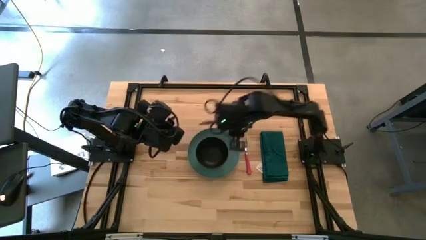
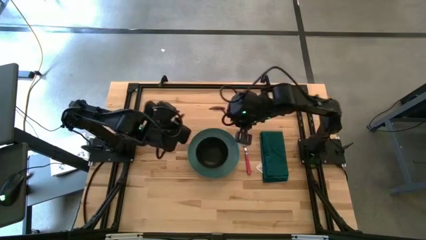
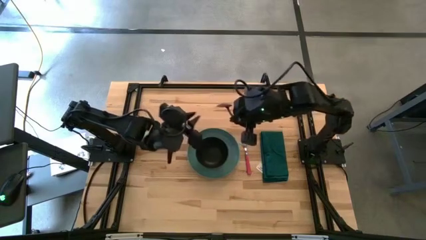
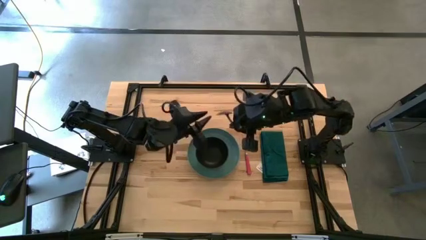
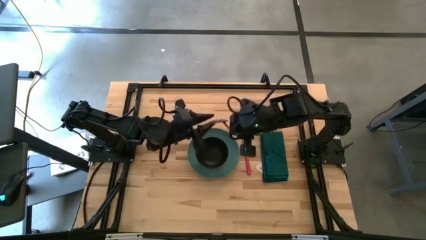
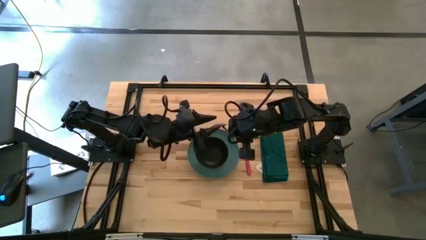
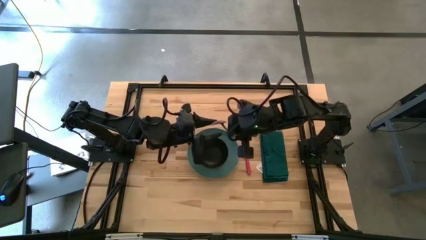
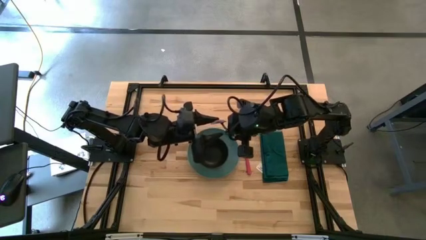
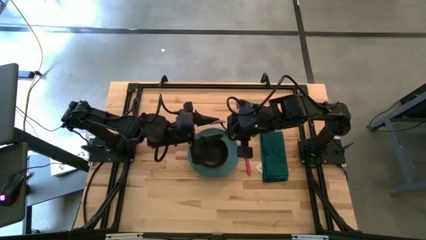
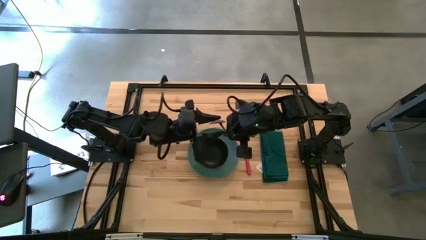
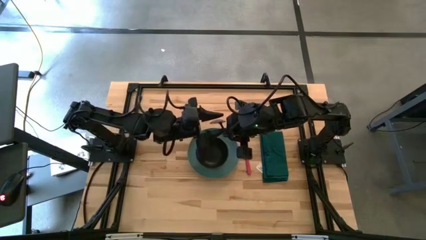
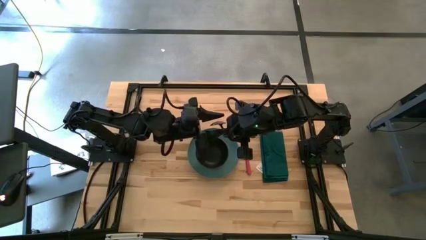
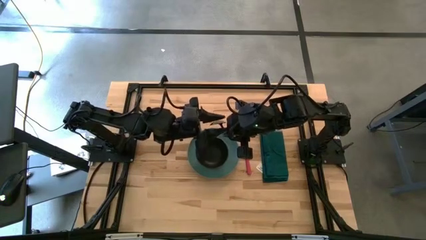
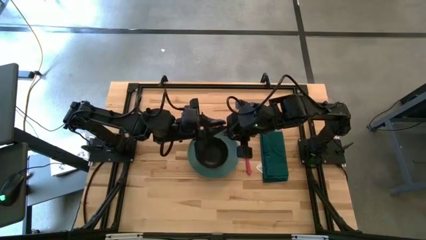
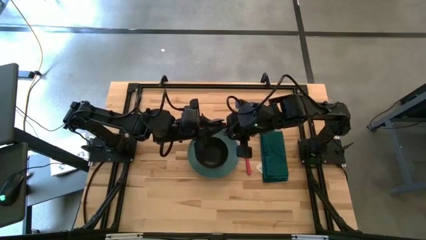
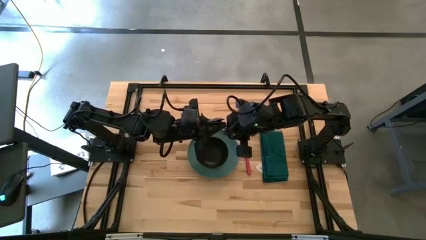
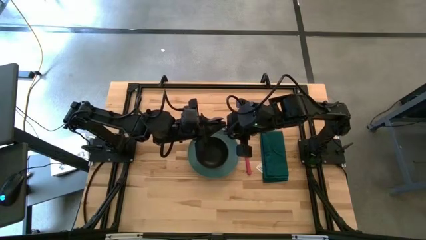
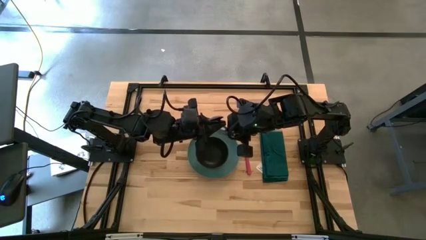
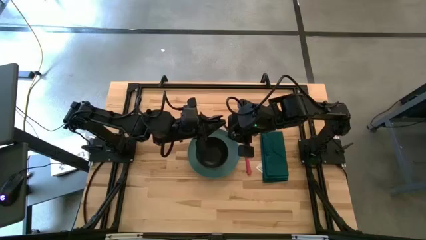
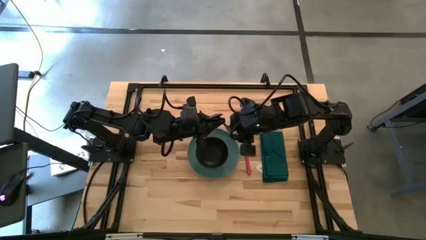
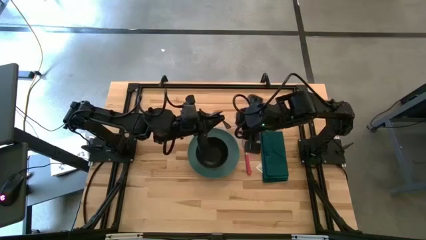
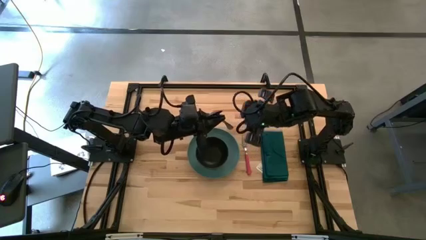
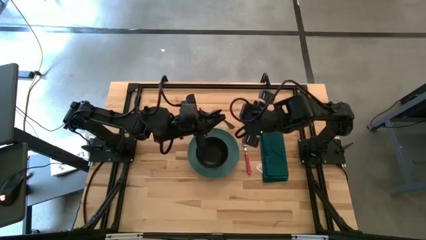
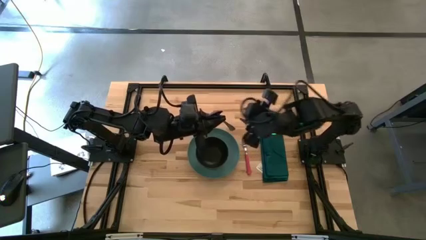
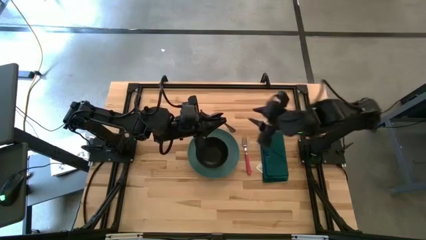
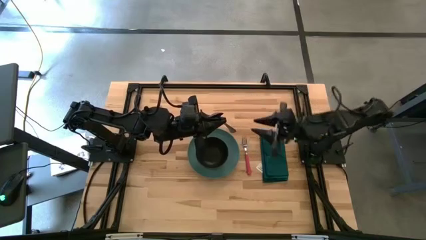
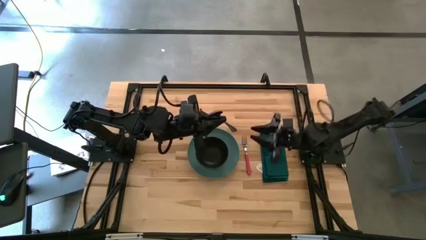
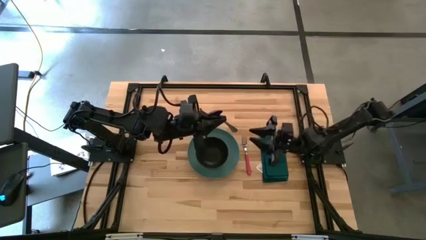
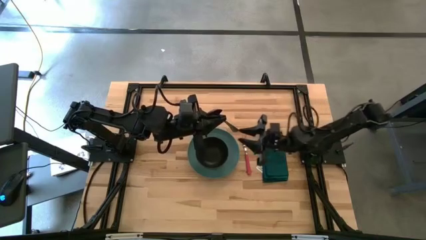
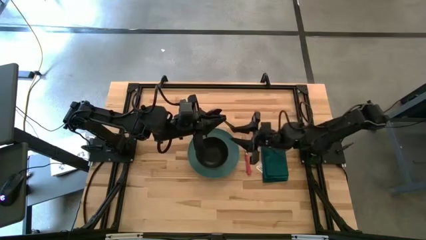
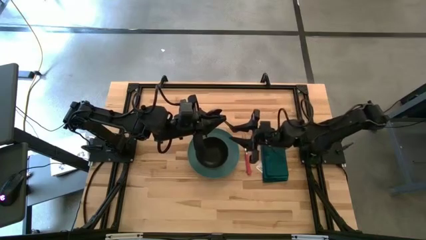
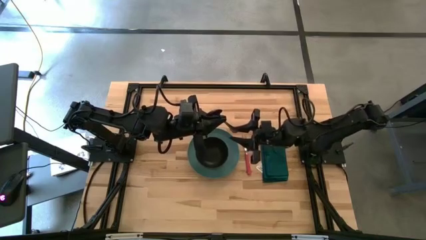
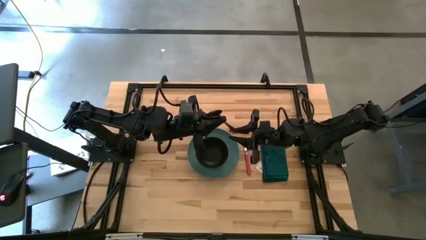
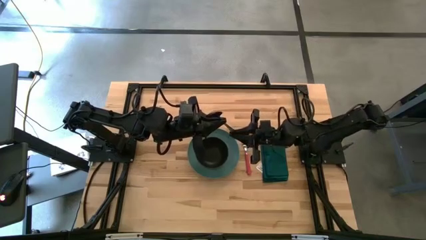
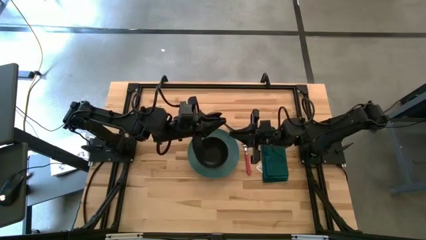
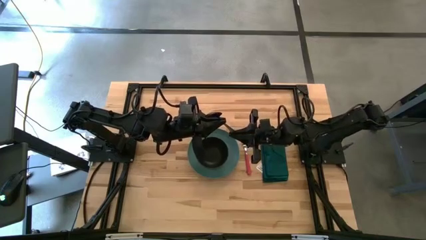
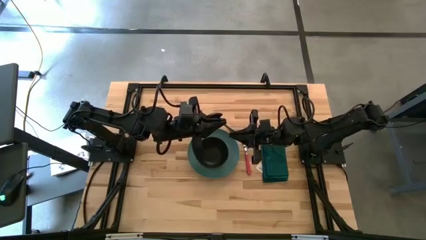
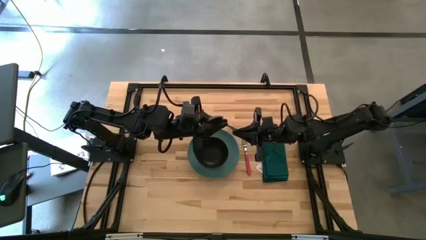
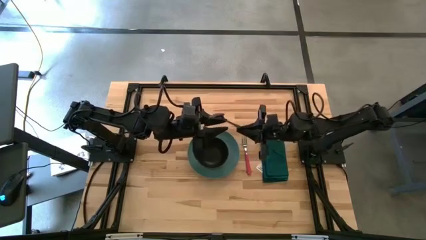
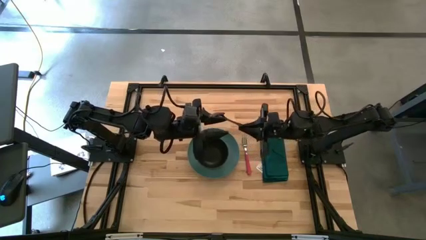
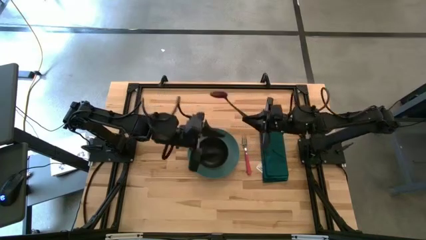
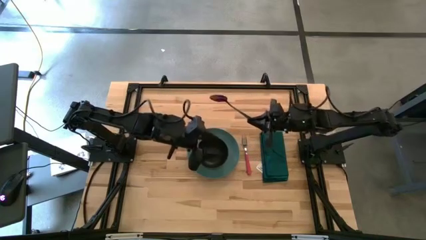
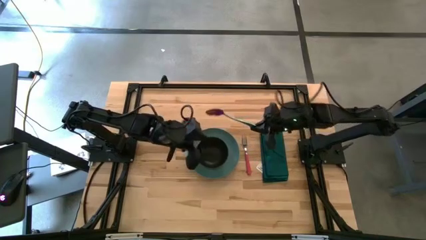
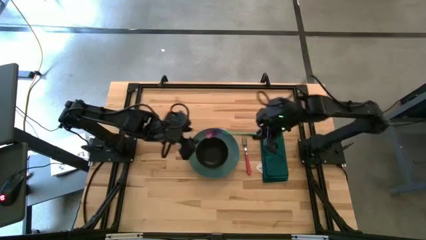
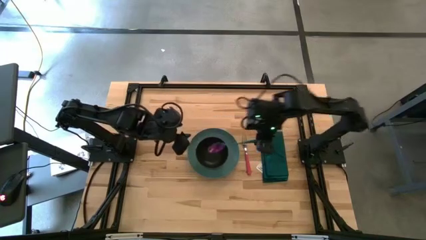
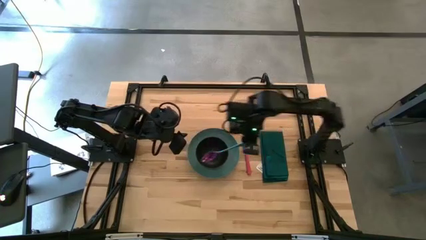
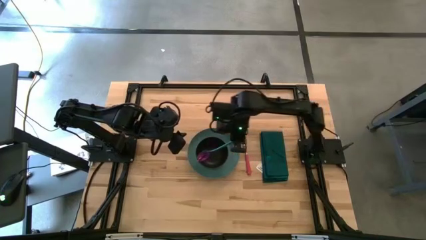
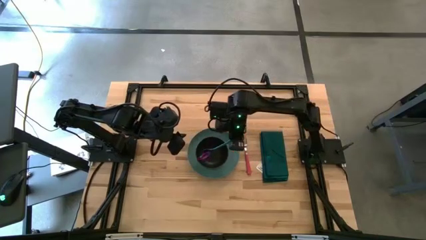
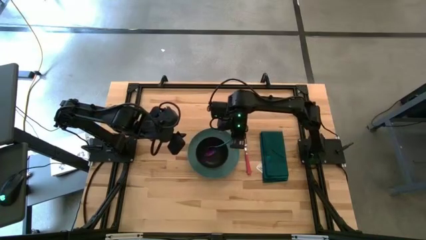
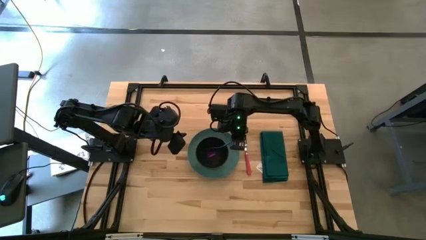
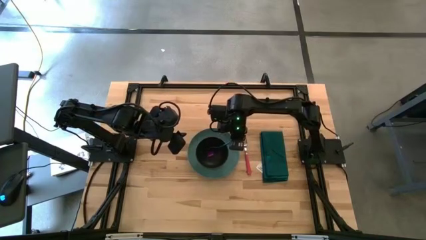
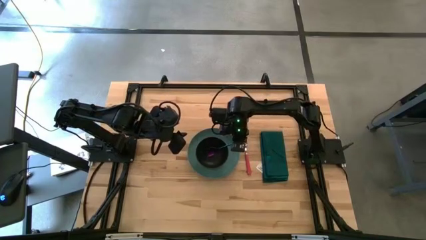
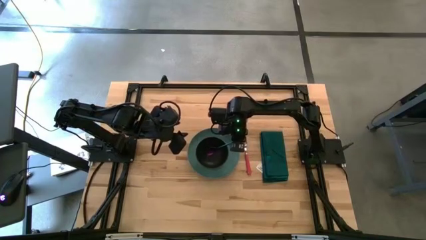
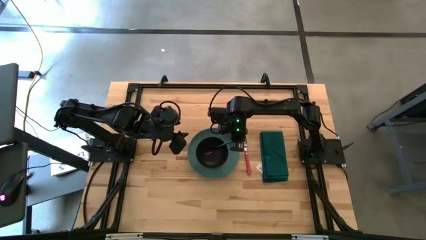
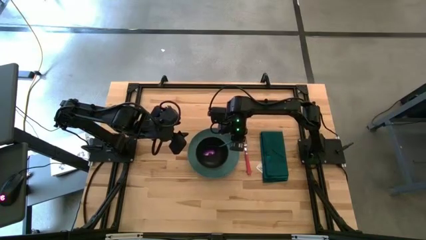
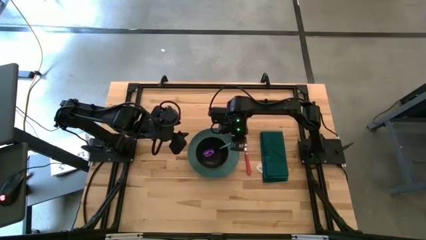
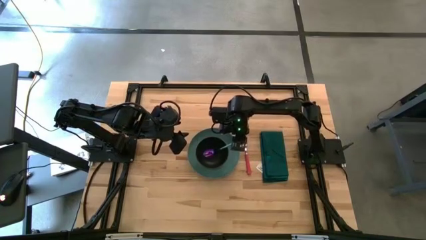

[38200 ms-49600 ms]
Task: Set table place
Put the blue spoon into the black bowl on the table

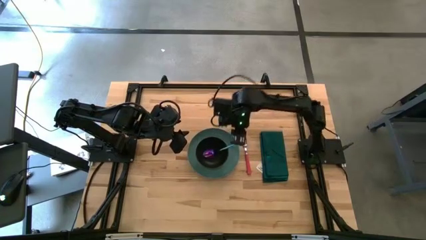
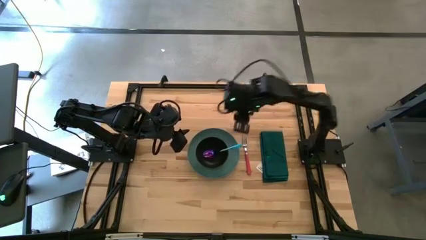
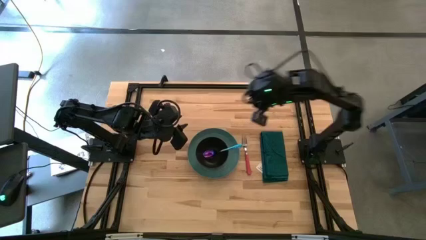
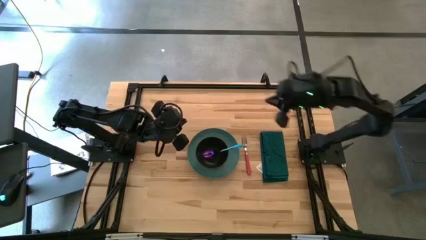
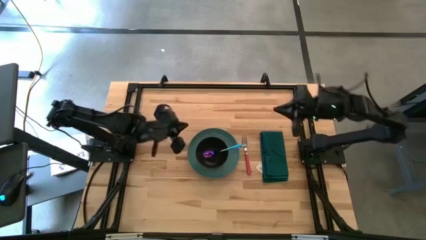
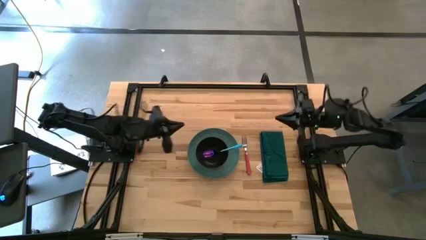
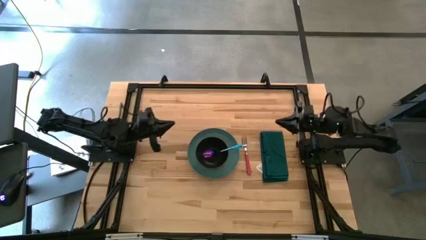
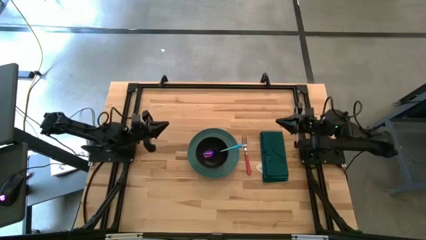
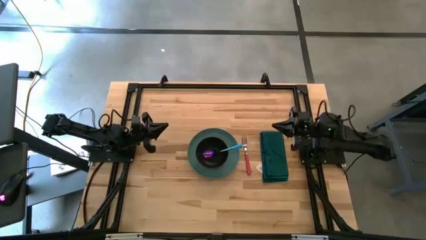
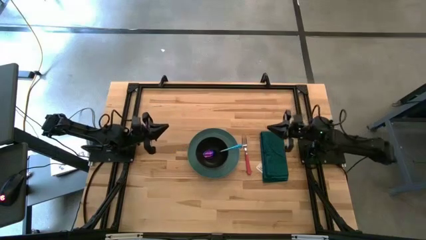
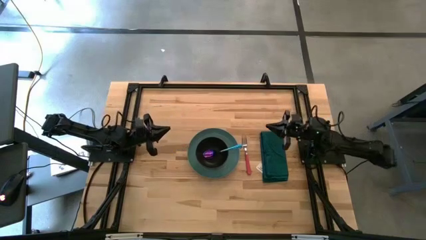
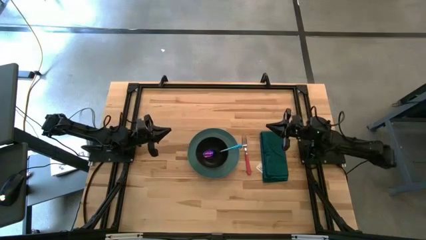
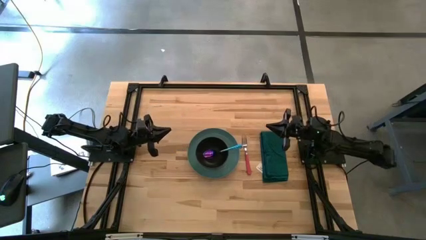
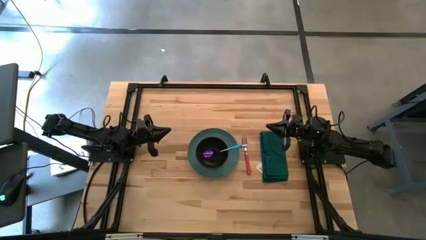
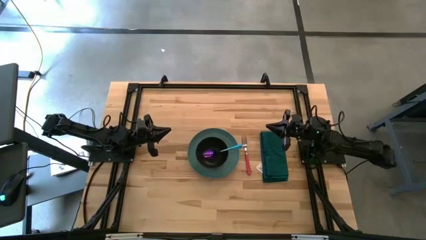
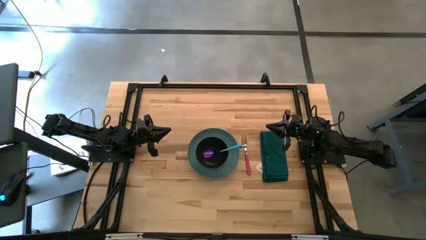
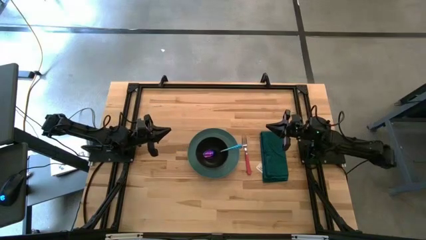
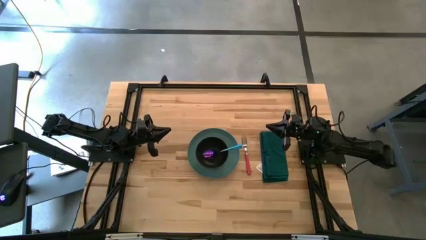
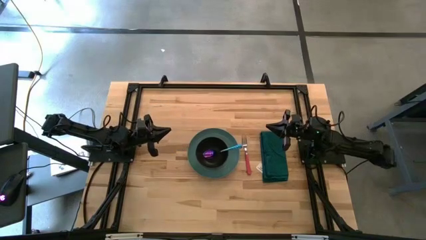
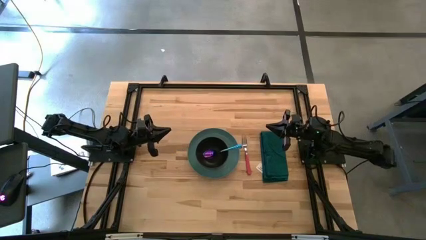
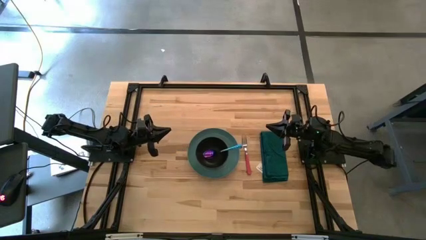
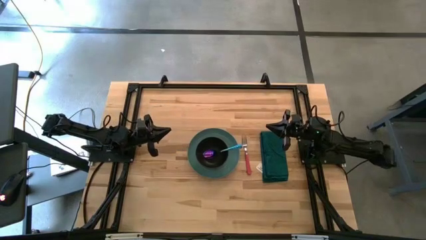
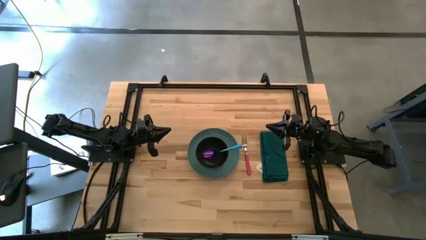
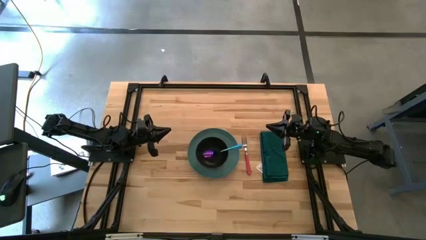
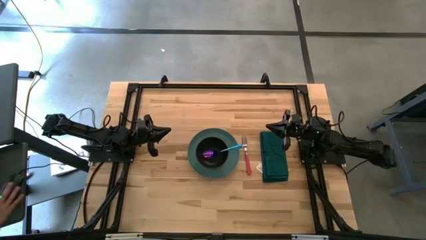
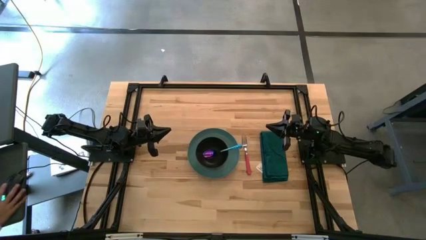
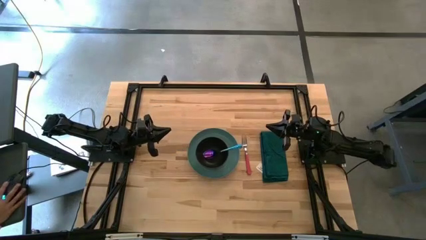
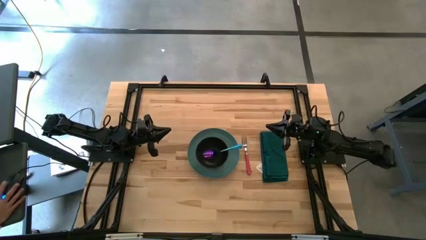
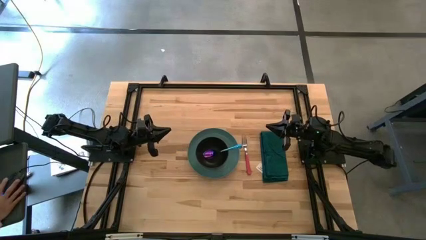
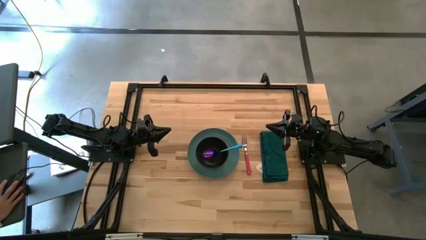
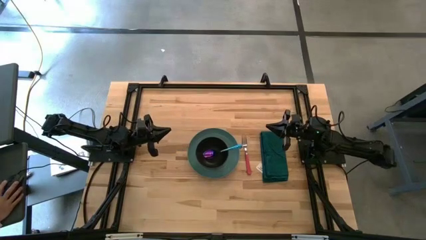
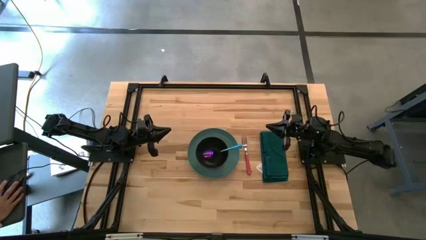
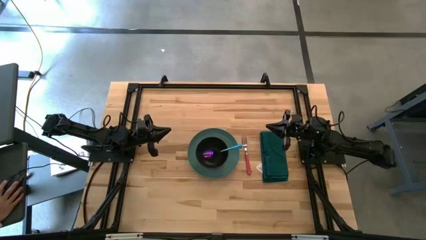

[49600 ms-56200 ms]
Return to Home Position
